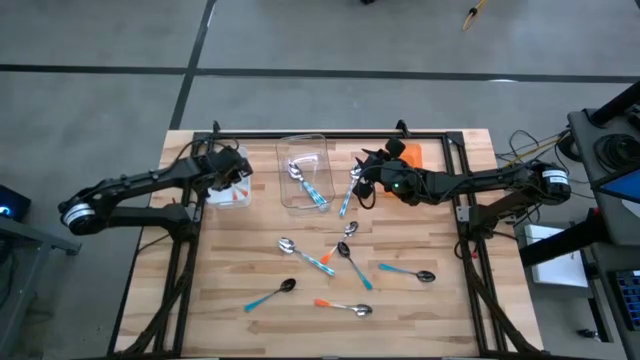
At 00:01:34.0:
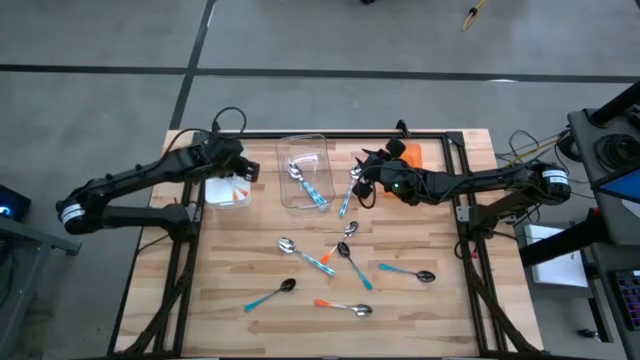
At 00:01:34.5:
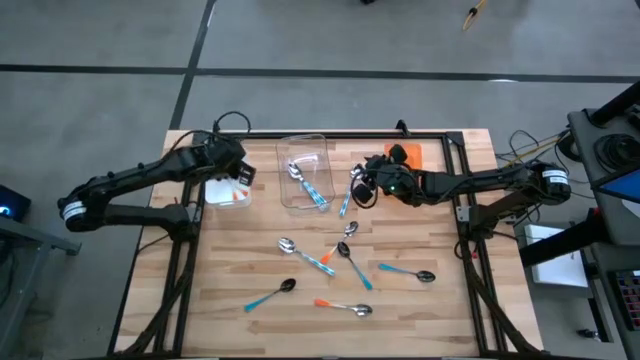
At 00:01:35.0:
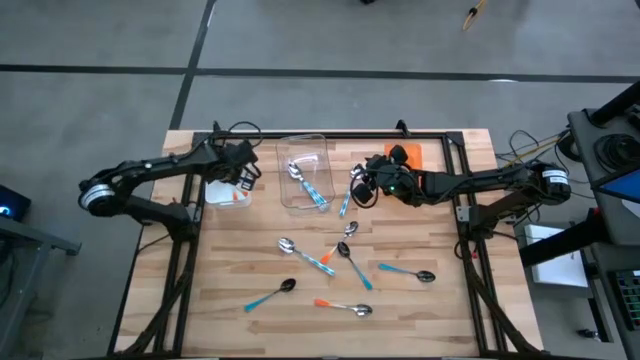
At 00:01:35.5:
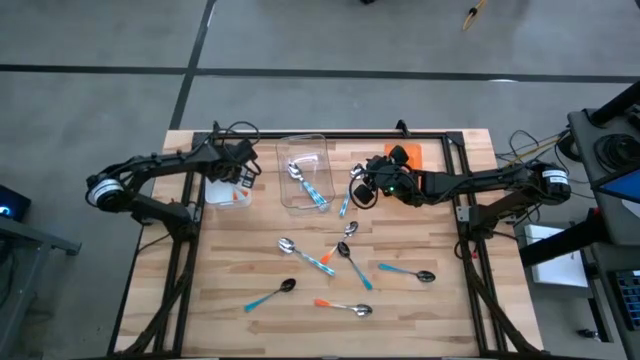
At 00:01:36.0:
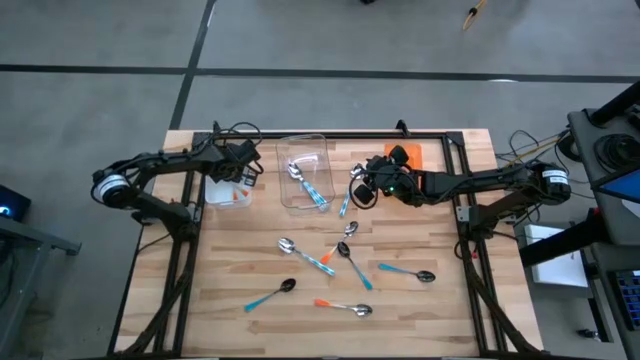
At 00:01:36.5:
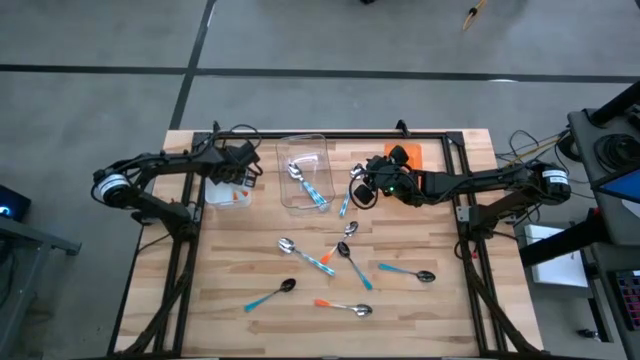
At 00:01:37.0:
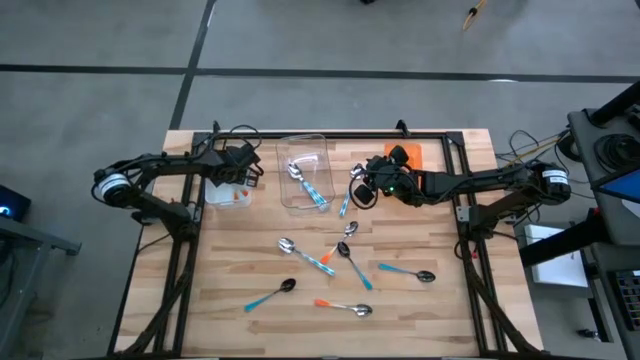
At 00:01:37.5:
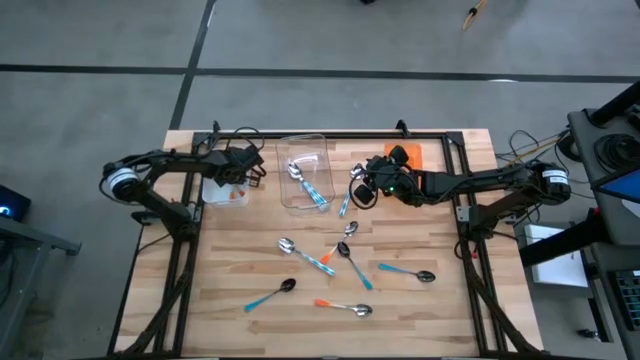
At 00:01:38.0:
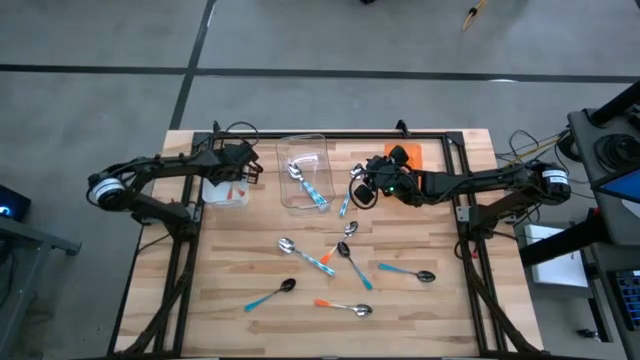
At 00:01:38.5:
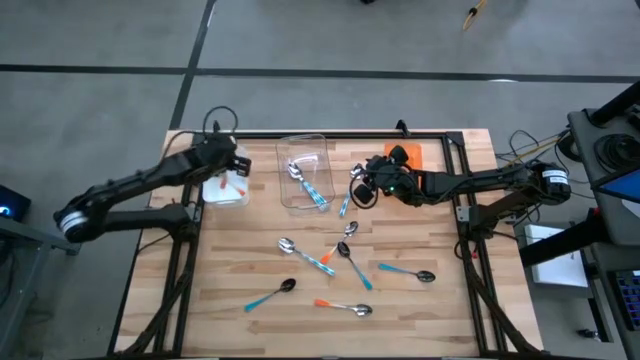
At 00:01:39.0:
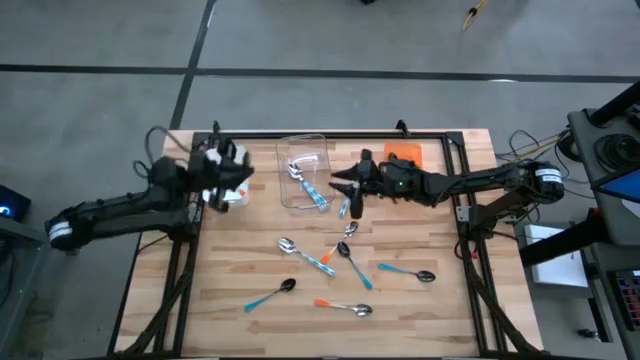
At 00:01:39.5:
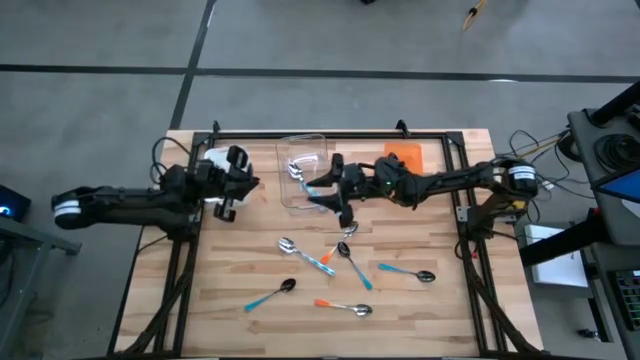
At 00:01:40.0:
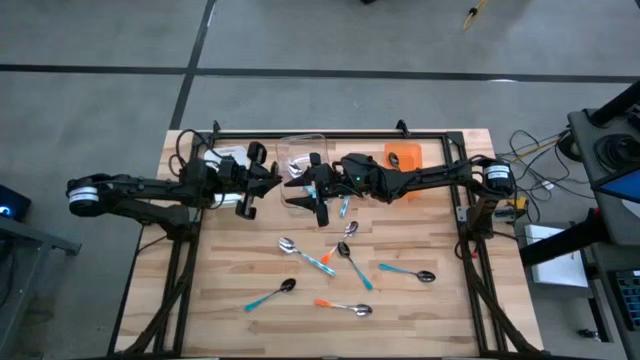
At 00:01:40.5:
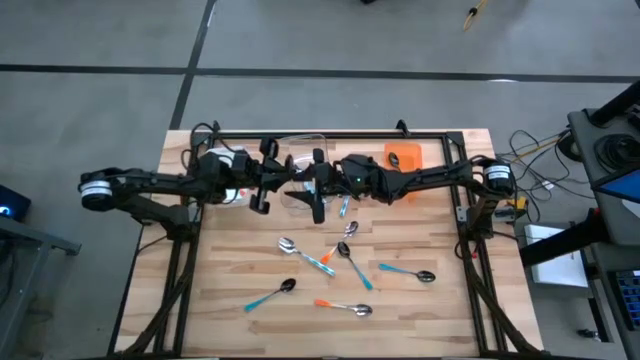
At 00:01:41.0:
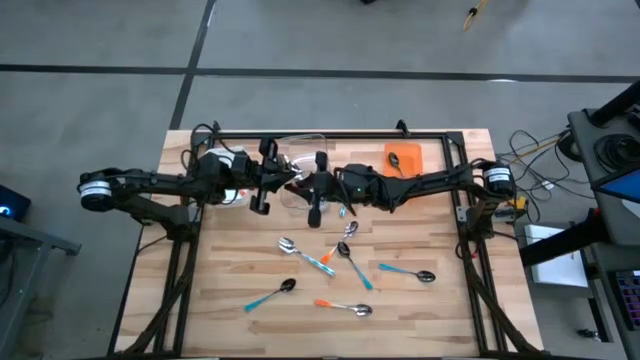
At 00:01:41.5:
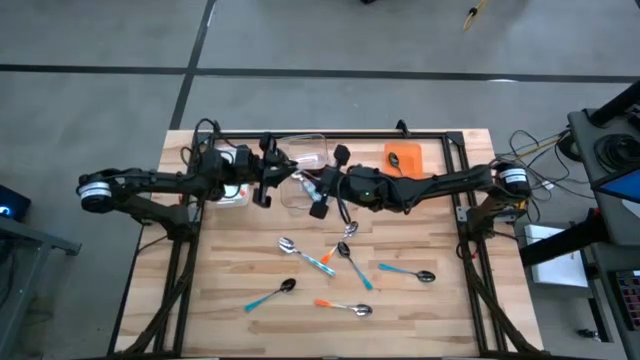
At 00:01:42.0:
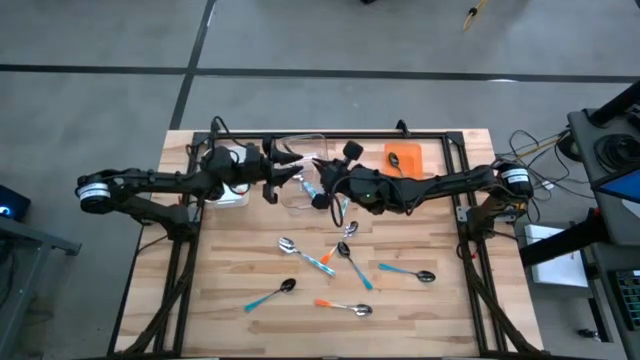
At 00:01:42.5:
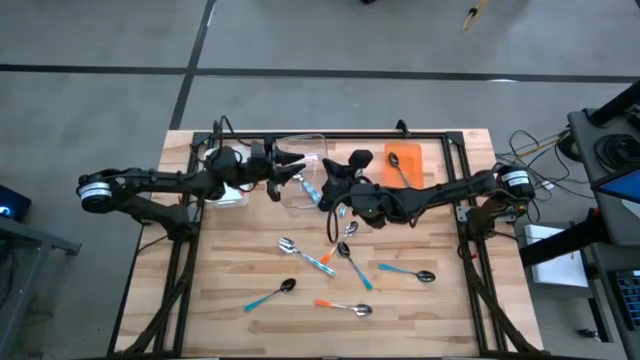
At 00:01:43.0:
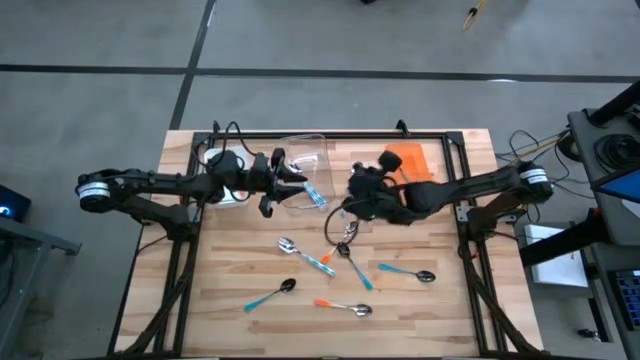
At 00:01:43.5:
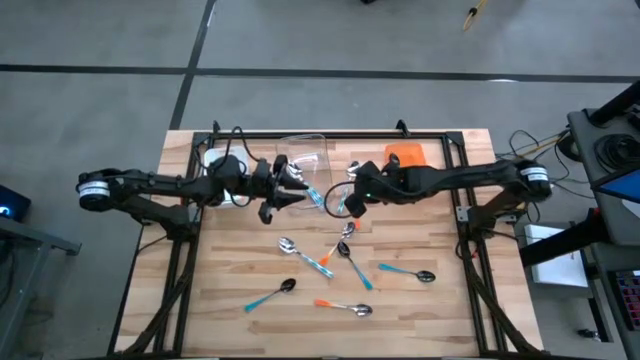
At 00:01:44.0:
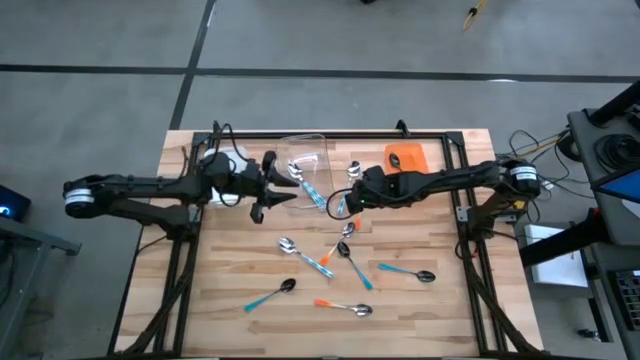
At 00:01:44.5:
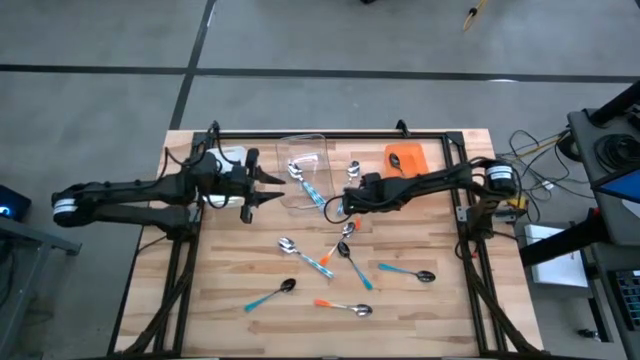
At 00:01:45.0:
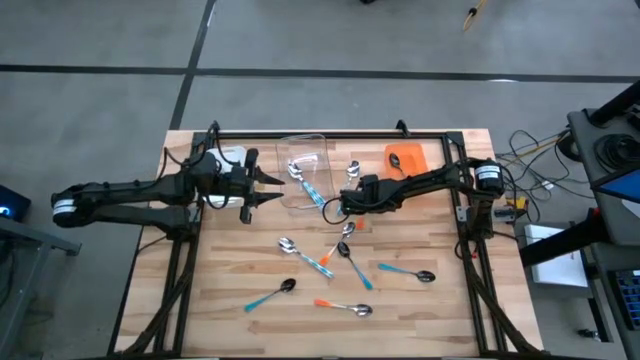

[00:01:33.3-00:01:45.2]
Task: Sort silverware by color (type)
Remove the orange spoon from the white bin

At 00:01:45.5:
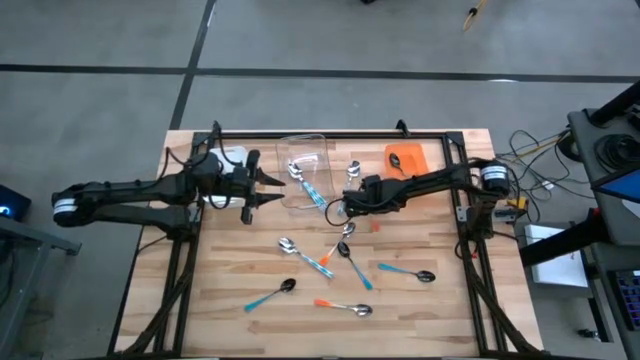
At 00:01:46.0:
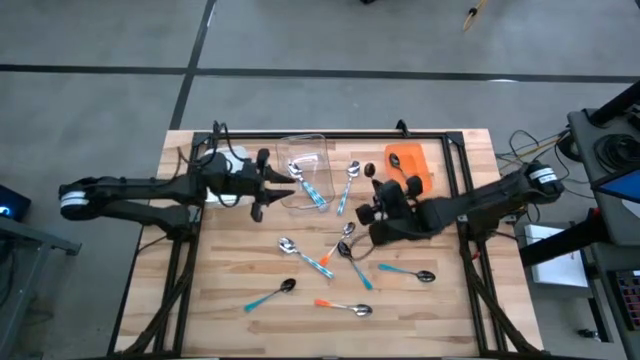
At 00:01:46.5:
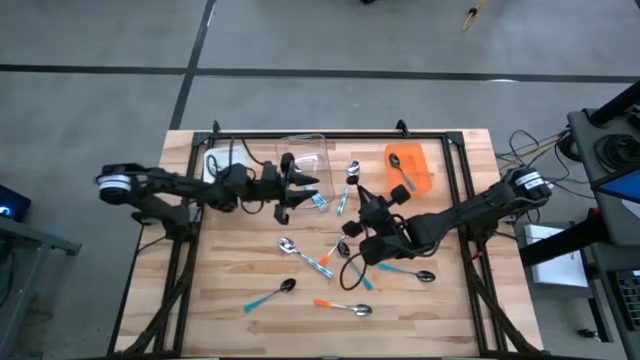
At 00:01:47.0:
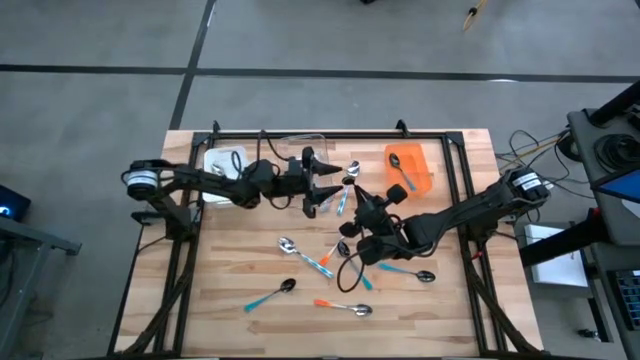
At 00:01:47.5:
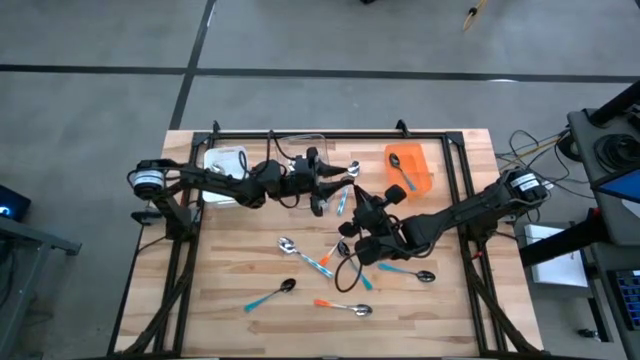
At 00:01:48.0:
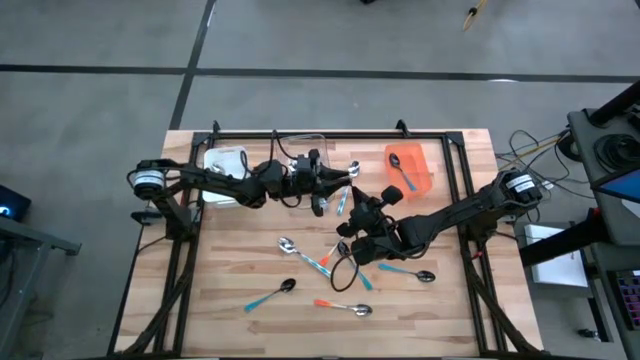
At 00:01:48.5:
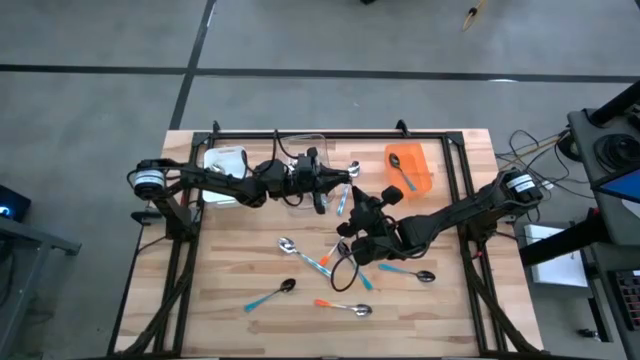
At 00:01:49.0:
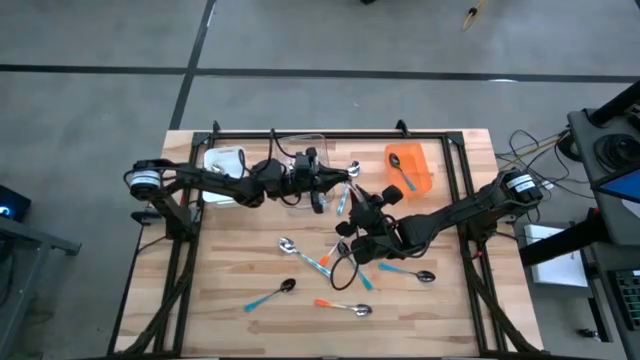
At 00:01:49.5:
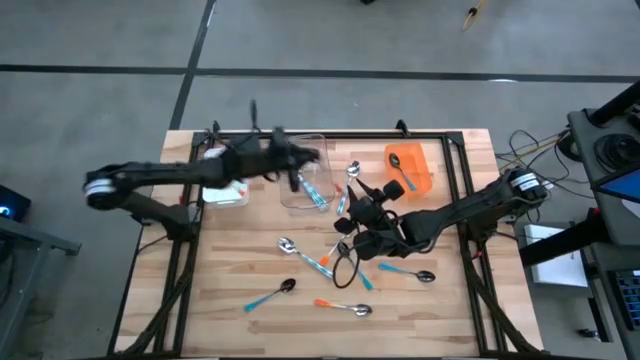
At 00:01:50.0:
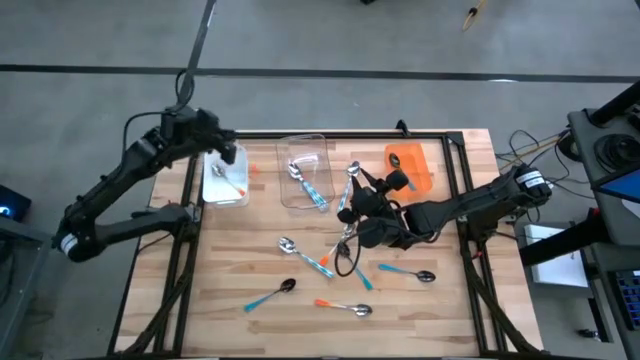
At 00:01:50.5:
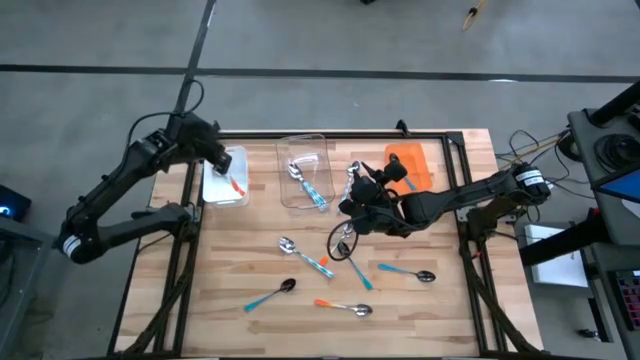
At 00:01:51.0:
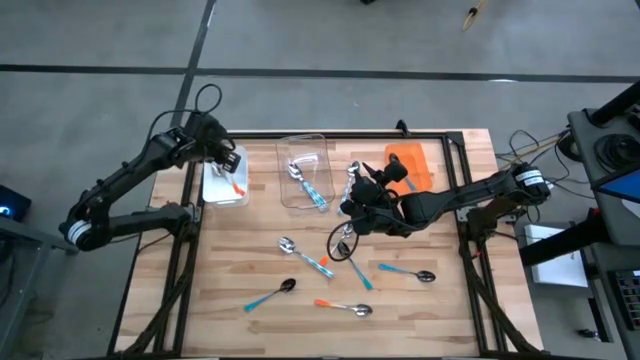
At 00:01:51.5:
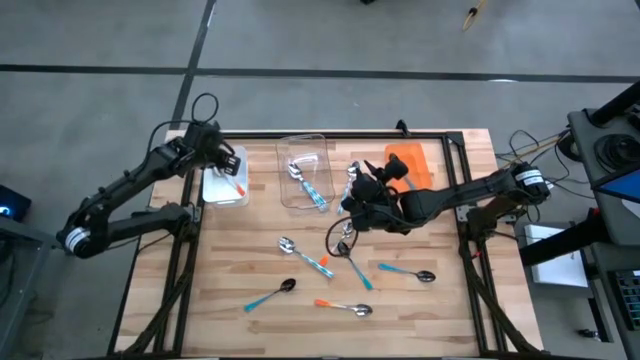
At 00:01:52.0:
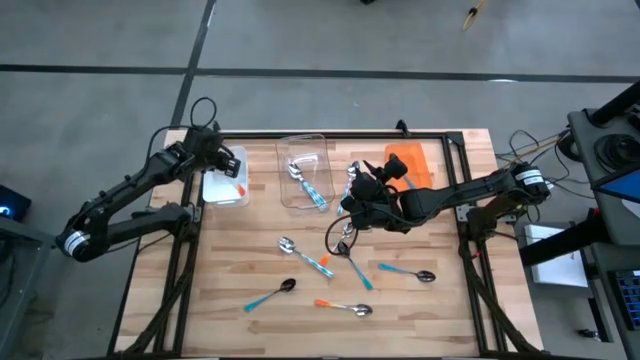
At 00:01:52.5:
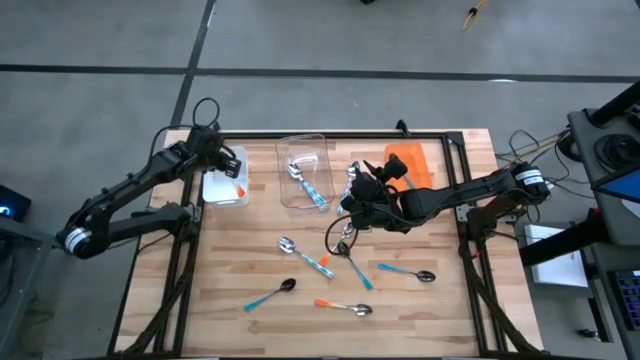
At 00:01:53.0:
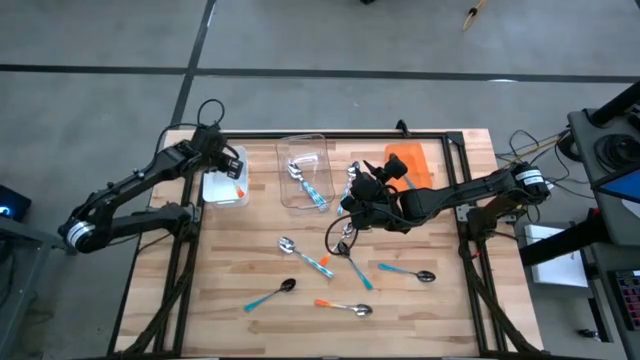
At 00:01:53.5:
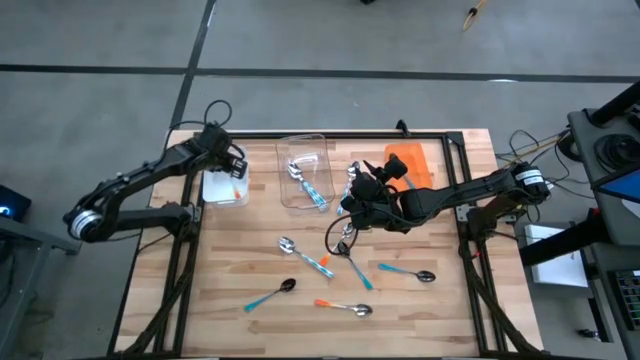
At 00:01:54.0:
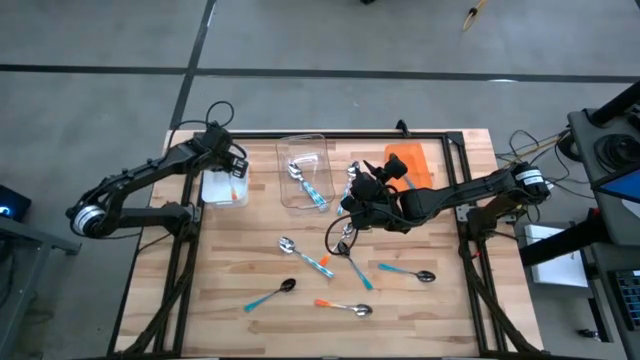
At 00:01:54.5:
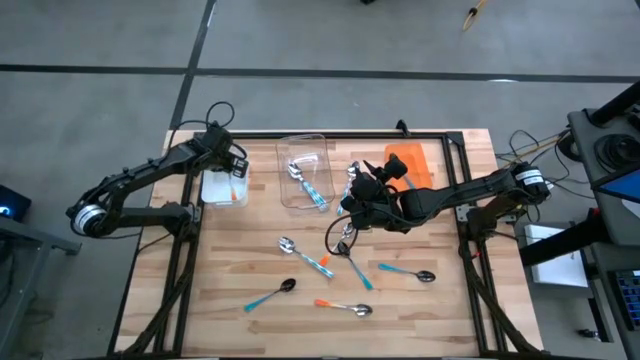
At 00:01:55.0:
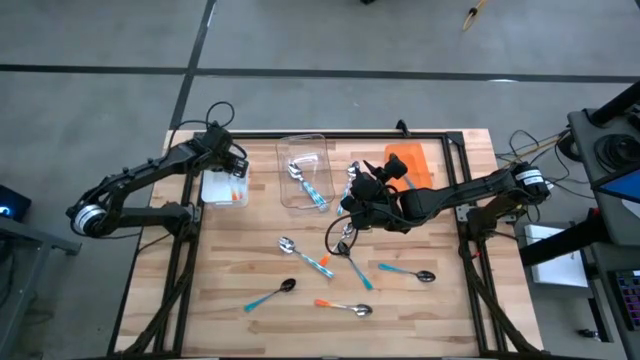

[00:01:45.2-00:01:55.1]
Put the orange spoon into the white bin
